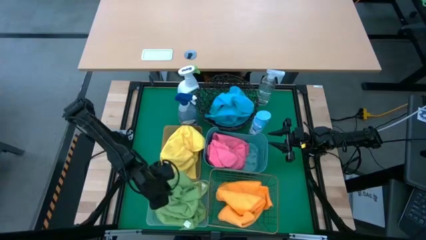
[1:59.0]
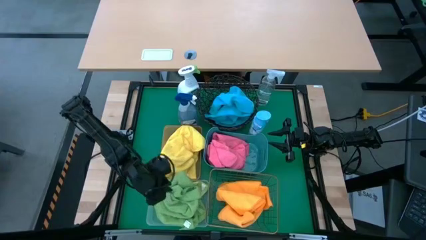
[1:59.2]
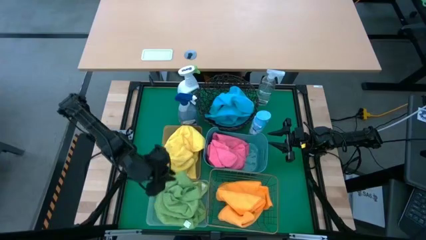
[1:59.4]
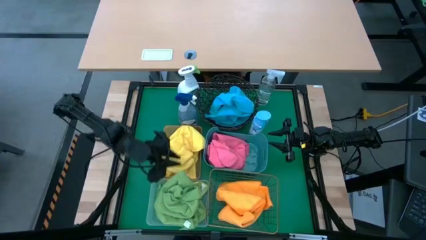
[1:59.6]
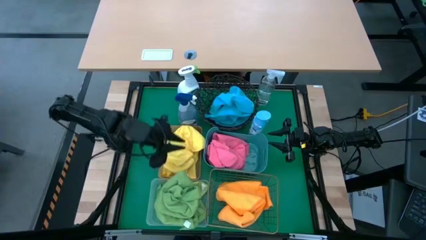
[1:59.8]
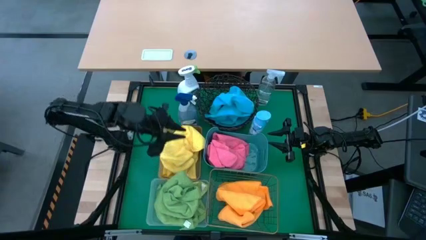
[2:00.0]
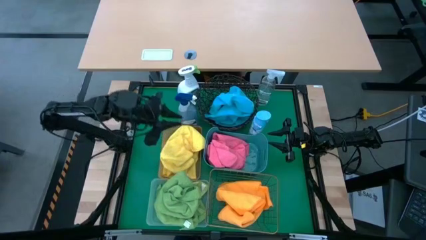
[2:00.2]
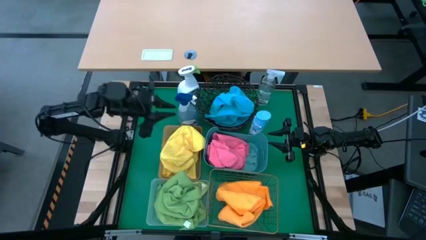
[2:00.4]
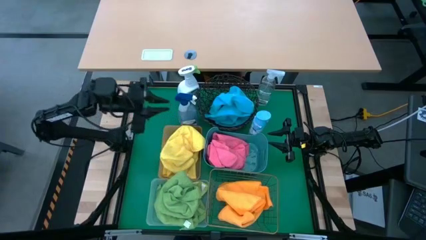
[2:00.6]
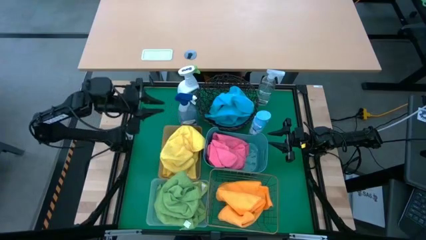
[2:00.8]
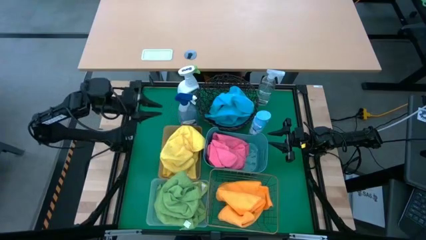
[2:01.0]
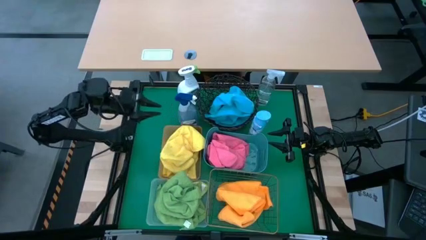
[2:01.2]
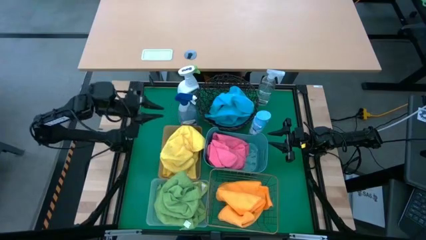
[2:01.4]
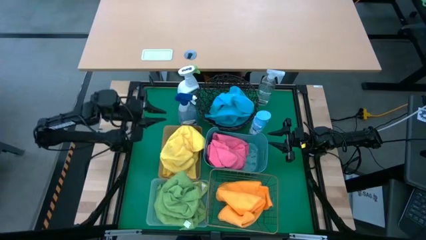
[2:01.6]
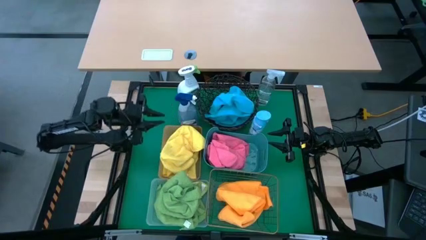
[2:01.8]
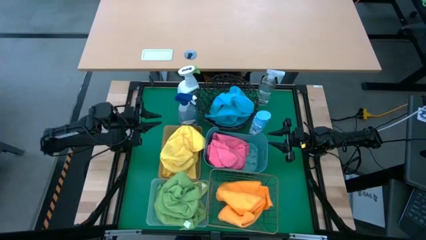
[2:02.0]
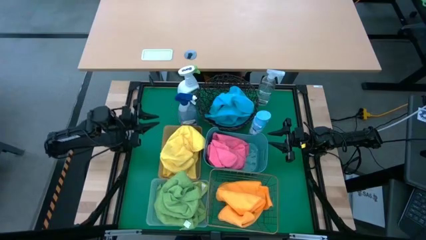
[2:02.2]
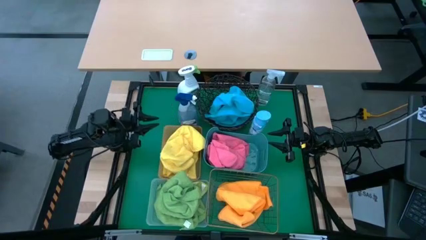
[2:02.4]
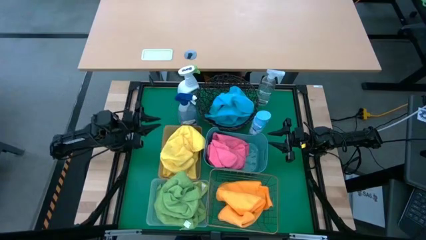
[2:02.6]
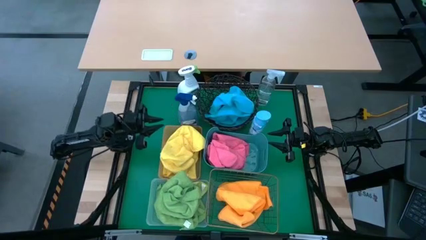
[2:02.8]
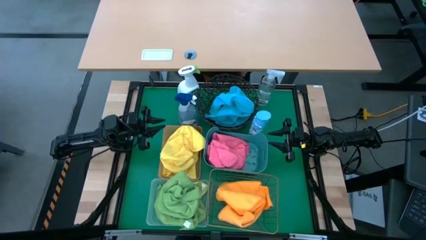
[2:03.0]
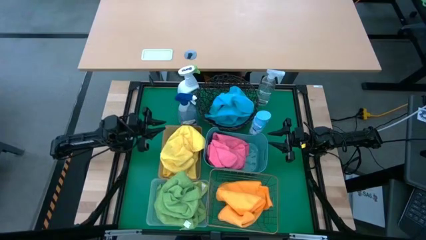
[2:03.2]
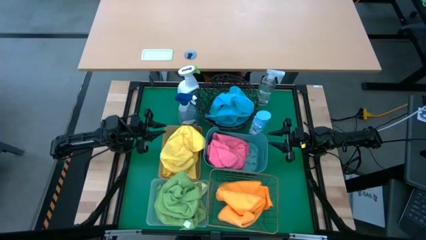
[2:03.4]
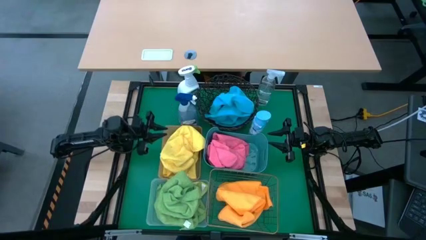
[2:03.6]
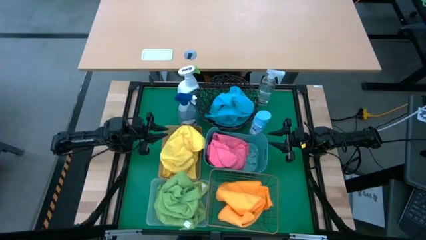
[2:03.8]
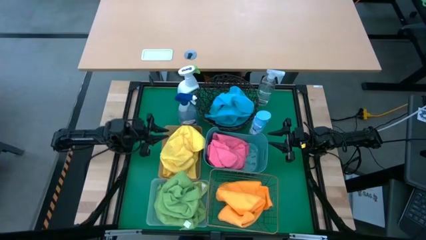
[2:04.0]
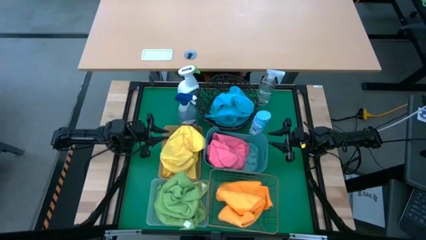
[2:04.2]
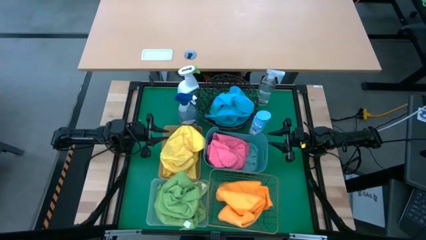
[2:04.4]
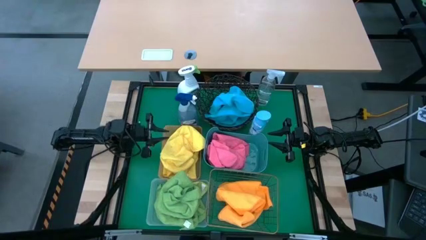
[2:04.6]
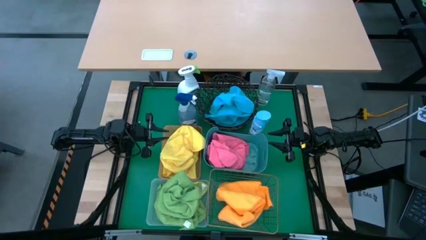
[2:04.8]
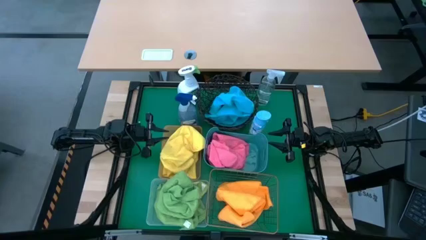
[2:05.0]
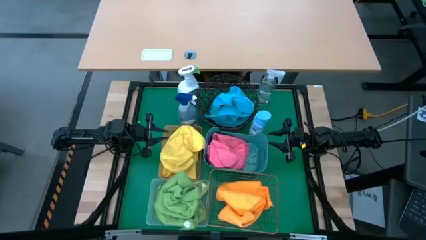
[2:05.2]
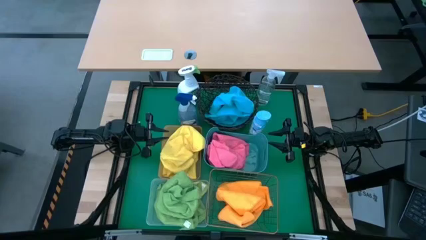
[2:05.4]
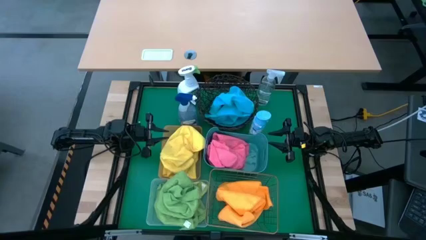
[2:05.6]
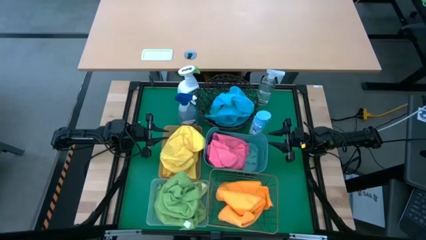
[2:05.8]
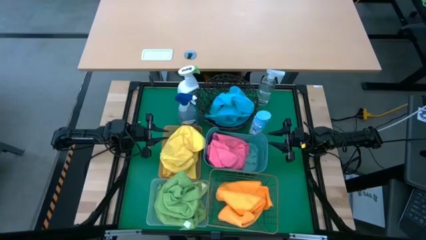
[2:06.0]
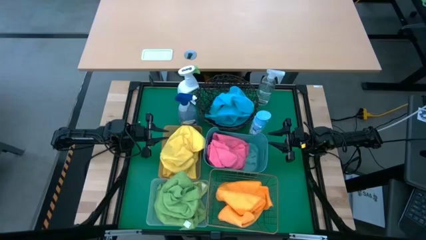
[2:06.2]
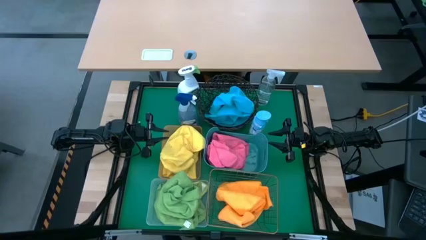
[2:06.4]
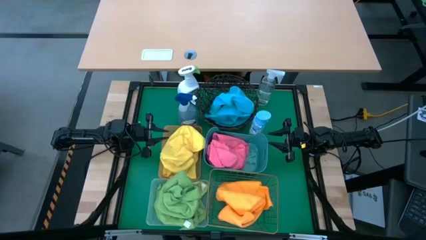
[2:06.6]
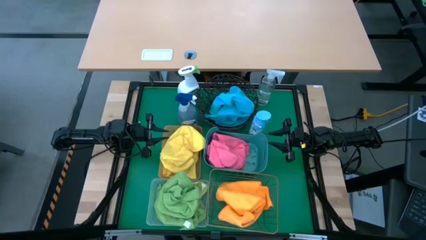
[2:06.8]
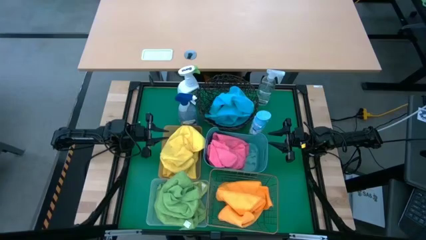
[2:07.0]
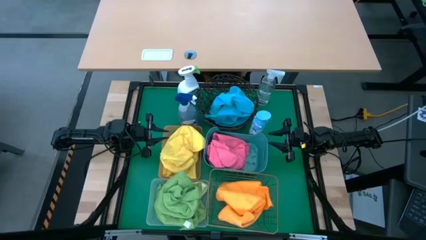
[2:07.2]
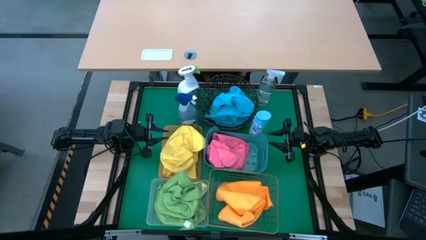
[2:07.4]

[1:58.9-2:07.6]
Task: Sort microfiber towel by color & place in baskets
Return to Home Position

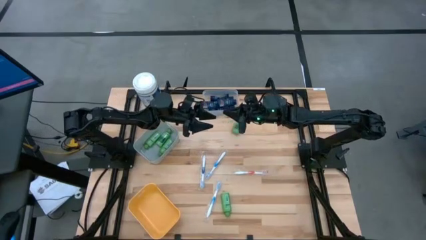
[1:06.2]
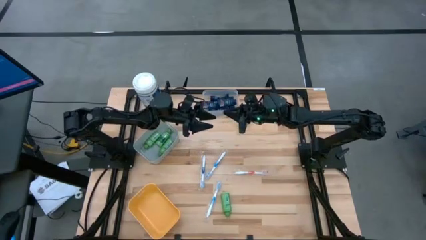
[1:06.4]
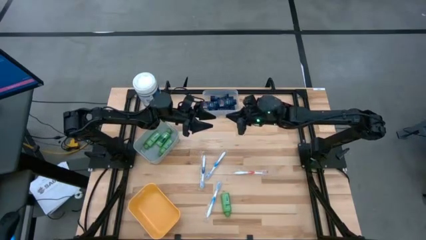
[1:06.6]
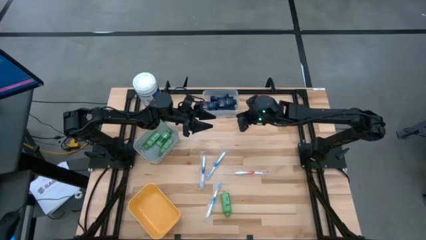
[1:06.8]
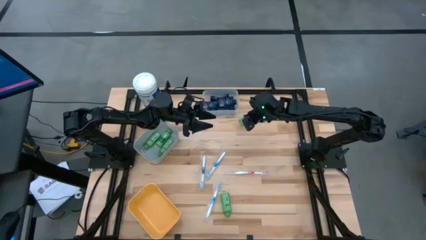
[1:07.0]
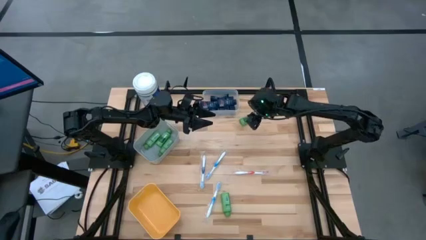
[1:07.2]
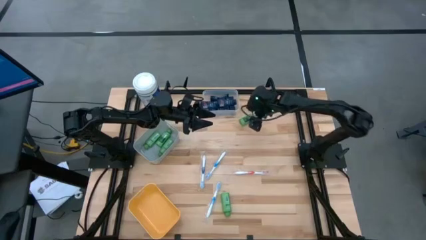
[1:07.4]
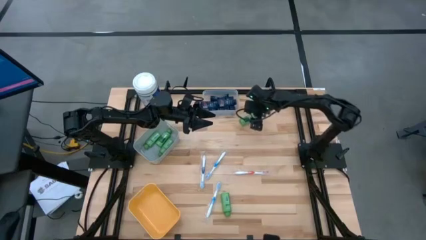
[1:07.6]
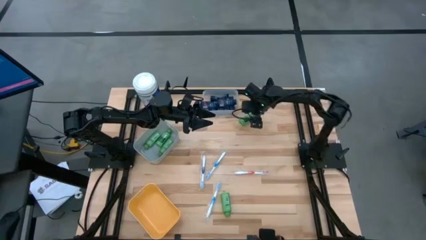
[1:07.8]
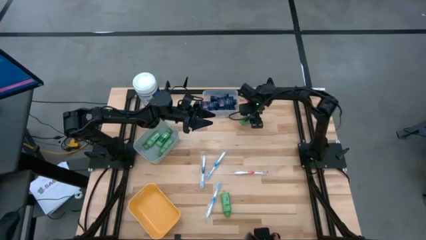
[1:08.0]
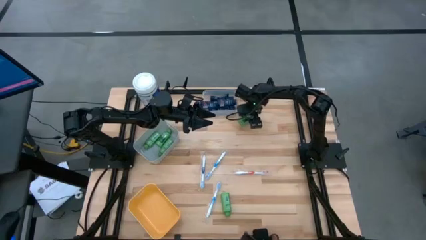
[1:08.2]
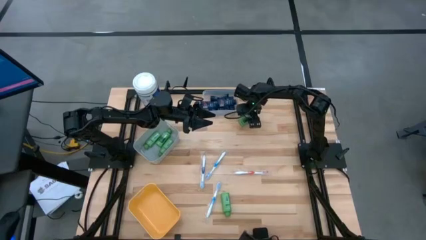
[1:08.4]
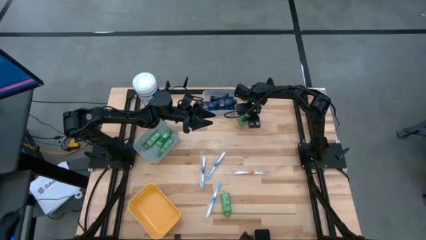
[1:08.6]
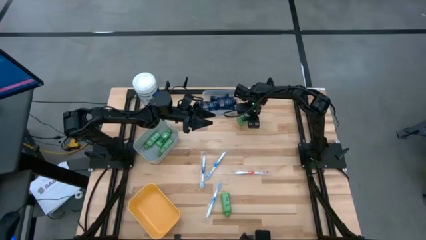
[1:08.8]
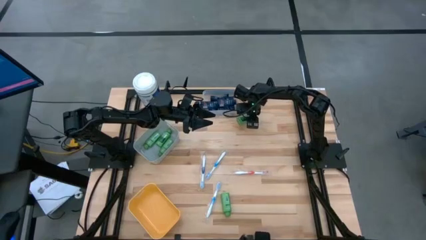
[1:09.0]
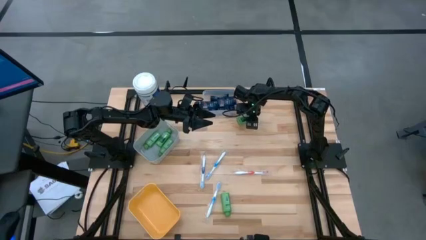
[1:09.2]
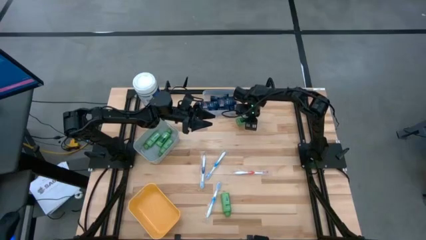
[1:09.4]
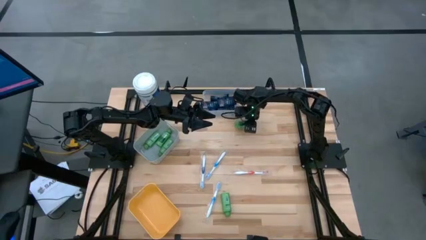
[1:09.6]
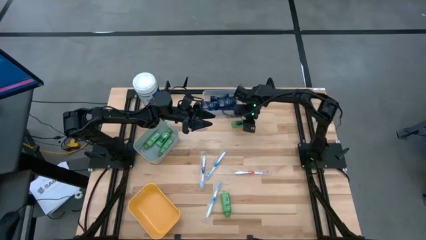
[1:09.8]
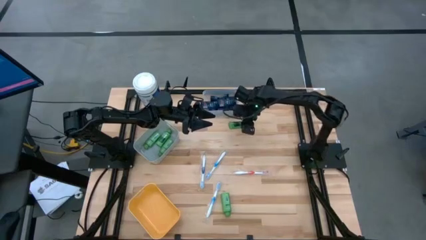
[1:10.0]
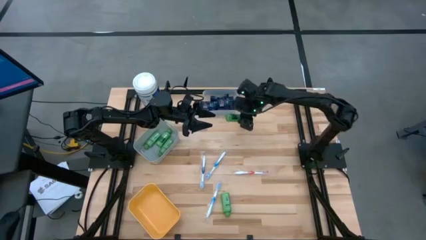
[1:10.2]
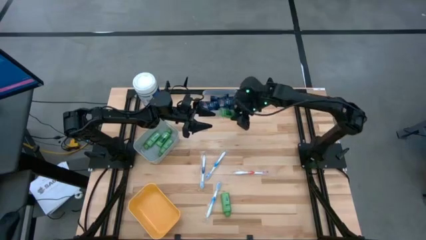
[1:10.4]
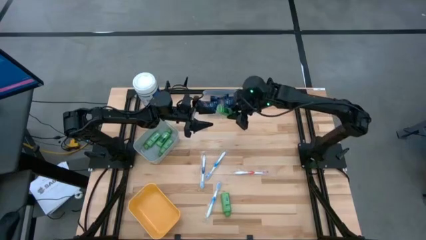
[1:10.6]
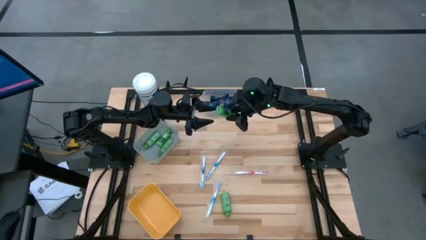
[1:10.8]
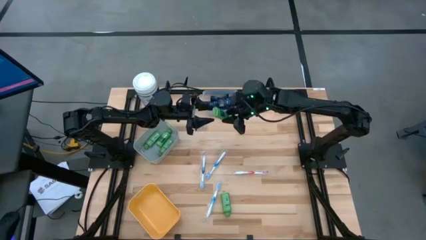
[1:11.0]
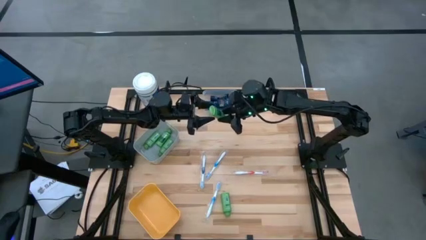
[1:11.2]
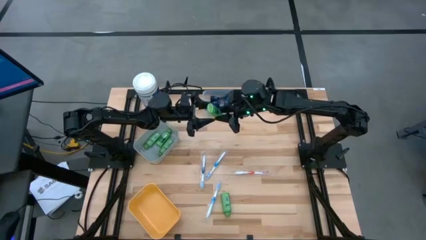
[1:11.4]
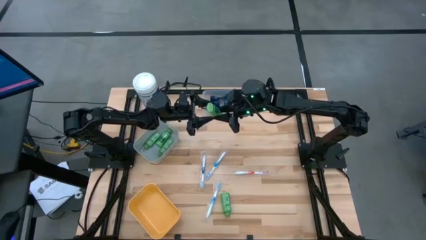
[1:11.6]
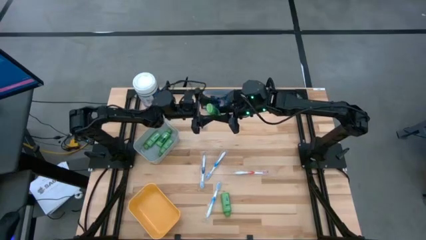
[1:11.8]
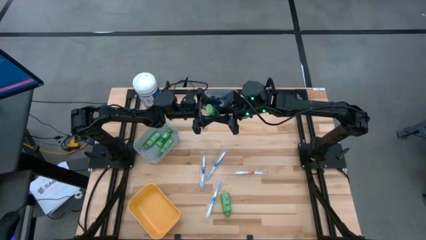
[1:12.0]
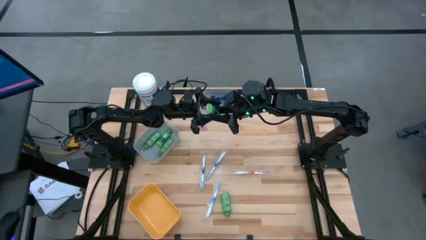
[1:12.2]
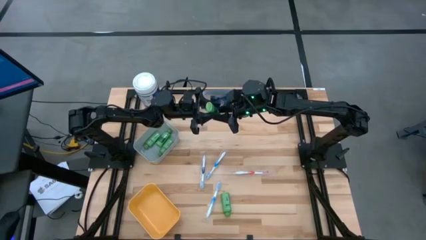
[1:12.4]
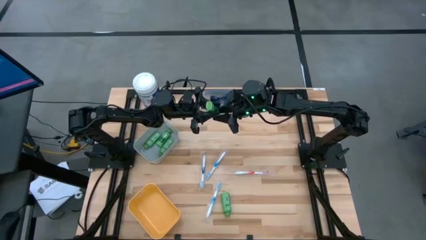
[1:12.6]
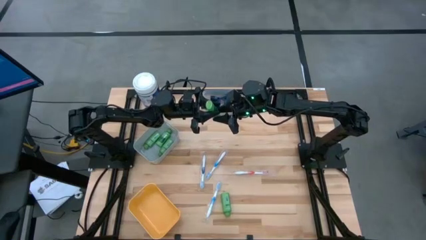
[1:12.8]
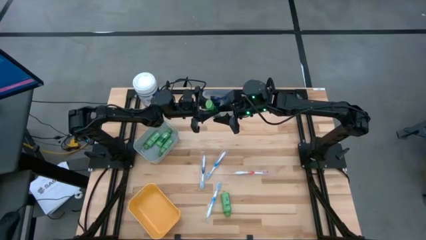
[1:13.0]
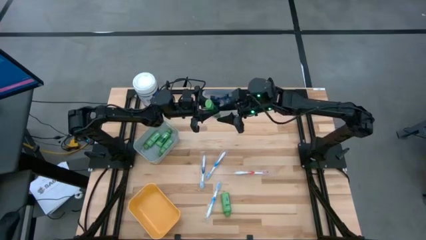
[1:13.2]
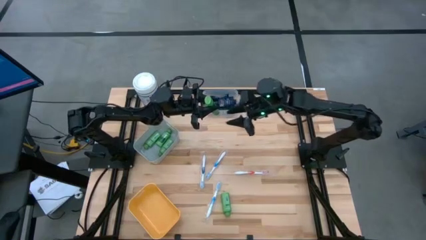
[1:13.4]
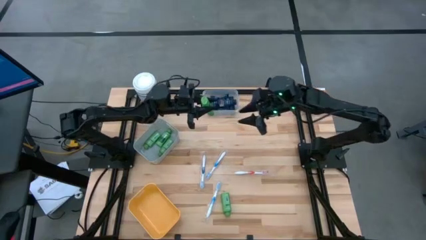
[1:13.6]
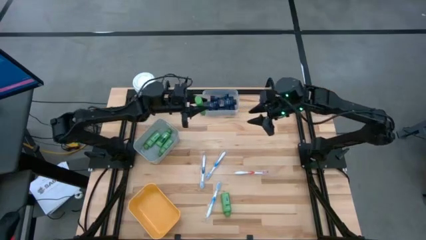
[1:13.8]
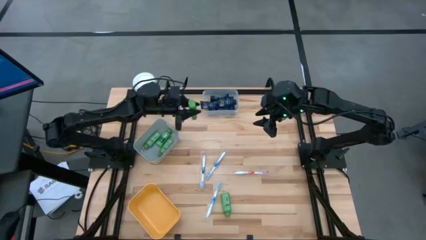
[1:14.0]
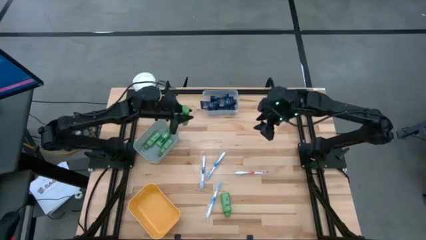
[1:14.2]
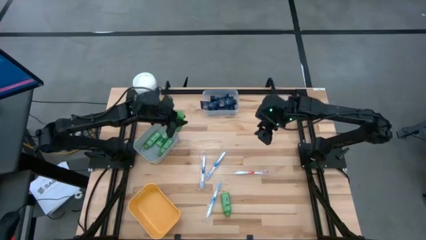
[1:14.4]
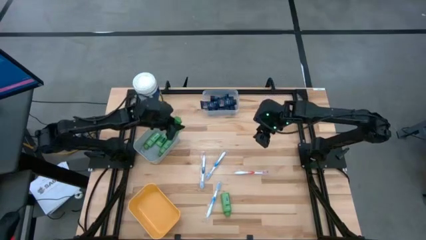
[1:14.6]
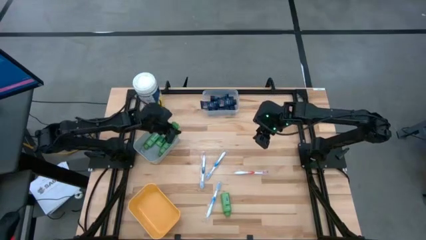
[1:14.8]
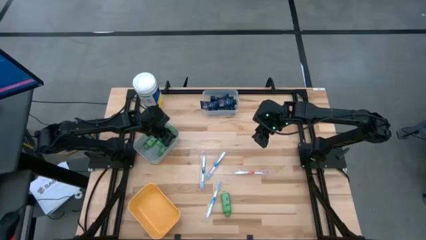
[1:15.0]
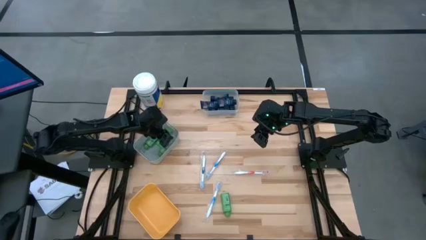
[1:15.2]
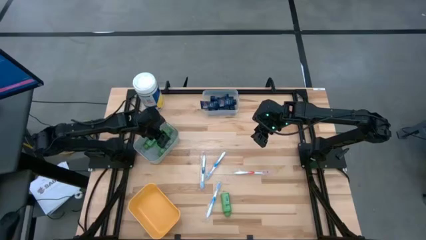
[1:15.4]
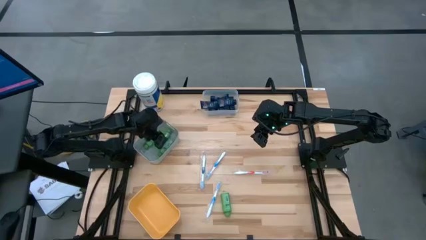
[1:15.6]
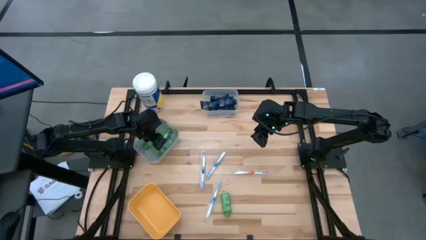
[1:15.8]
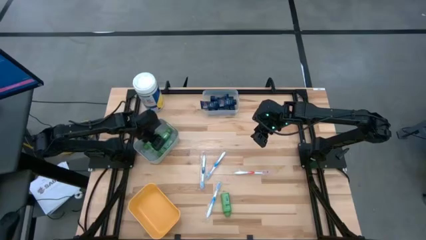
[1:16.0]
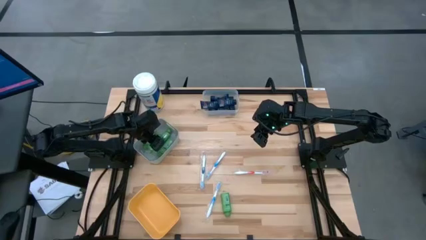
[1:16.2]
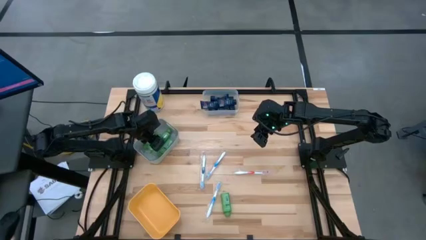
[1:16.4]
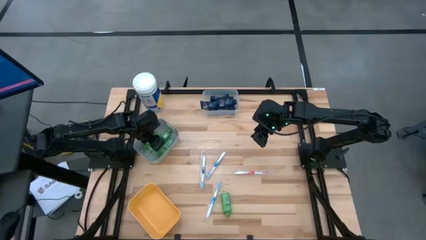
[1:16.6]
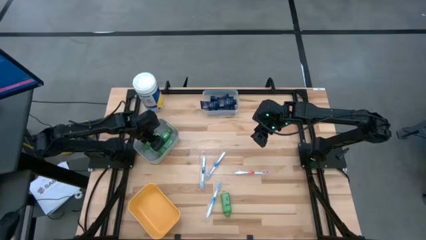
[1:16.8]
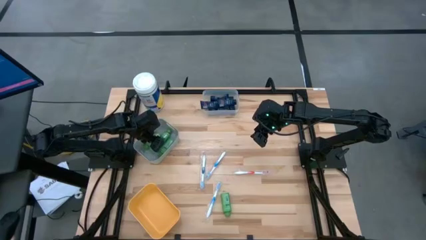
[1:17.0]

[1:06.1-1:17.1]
Task: Pick & Place Travel size toiletries
Put the green shampoo into the gray bin
